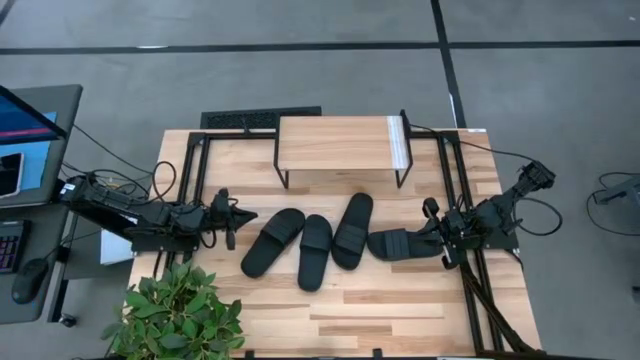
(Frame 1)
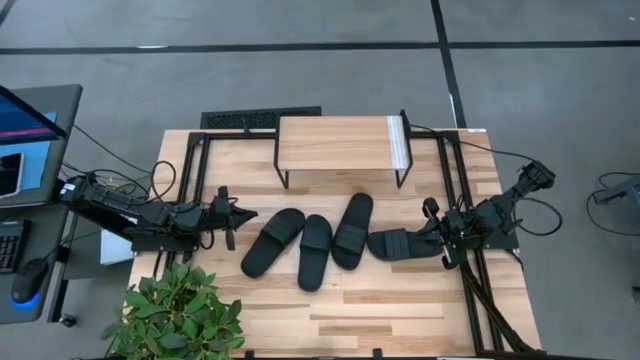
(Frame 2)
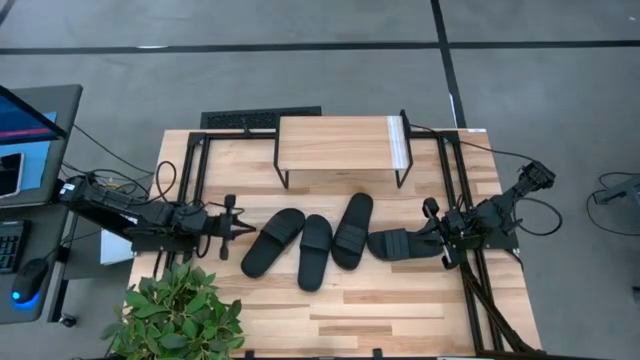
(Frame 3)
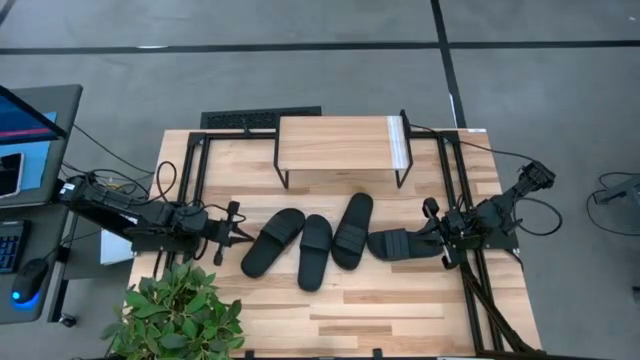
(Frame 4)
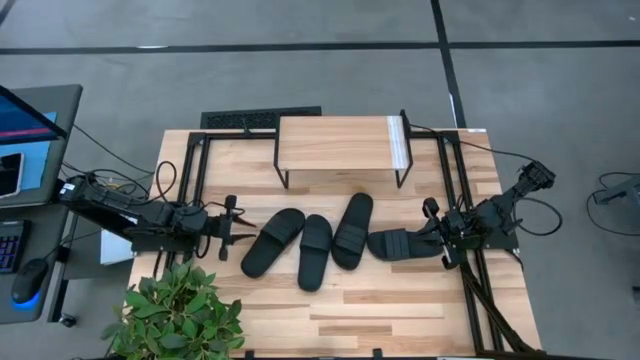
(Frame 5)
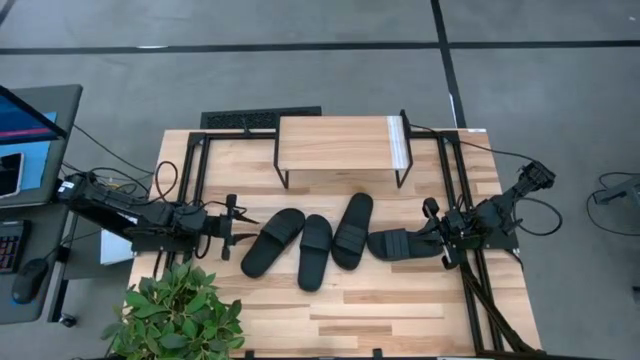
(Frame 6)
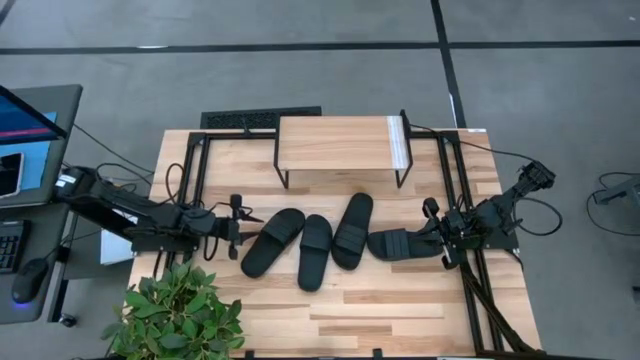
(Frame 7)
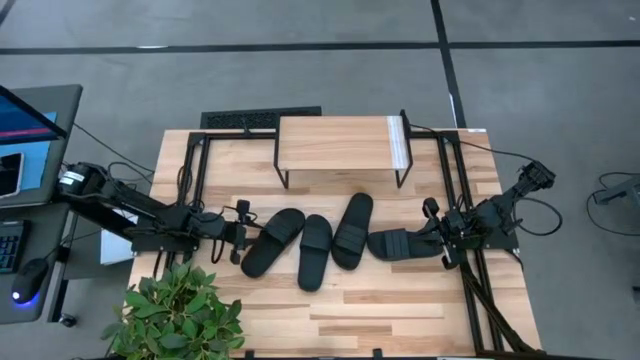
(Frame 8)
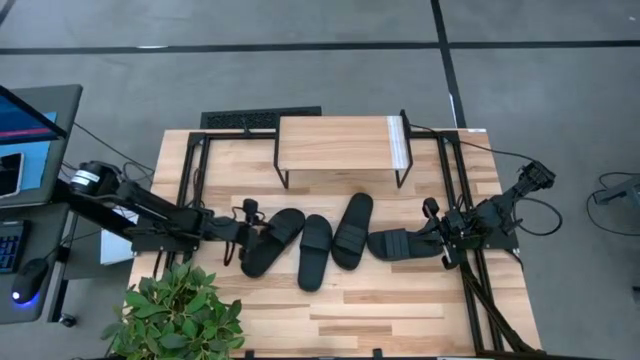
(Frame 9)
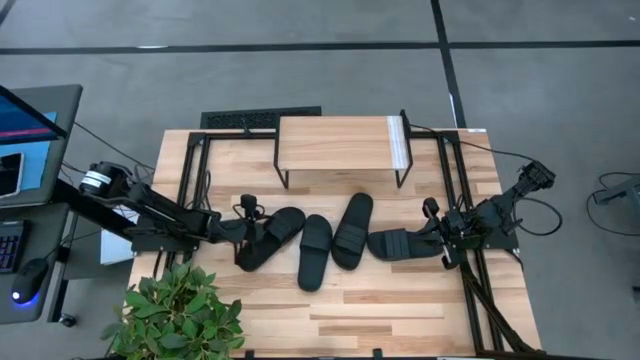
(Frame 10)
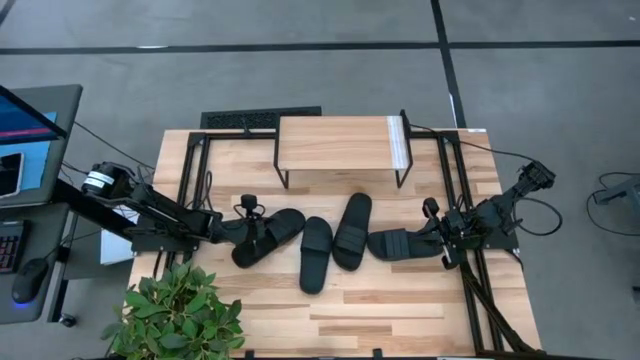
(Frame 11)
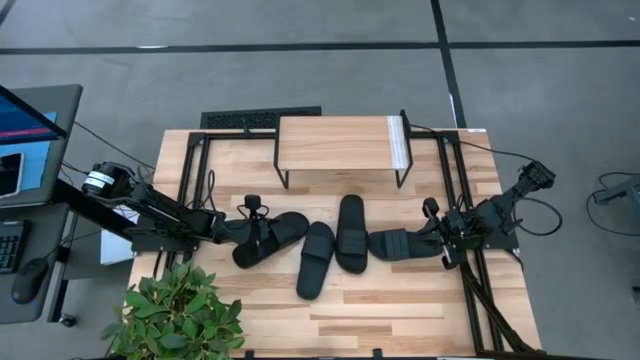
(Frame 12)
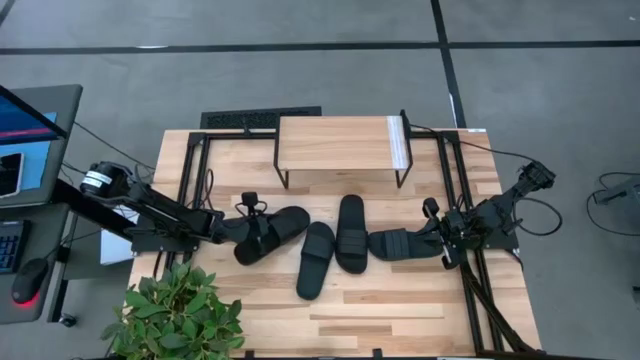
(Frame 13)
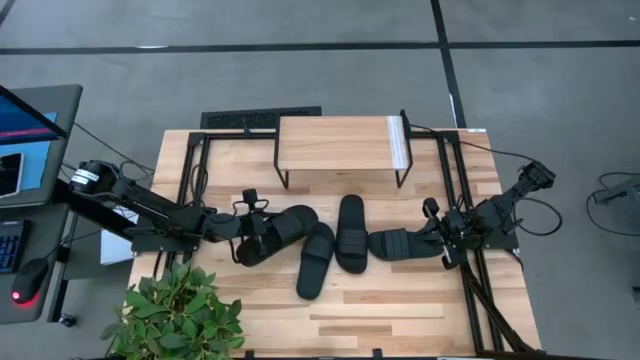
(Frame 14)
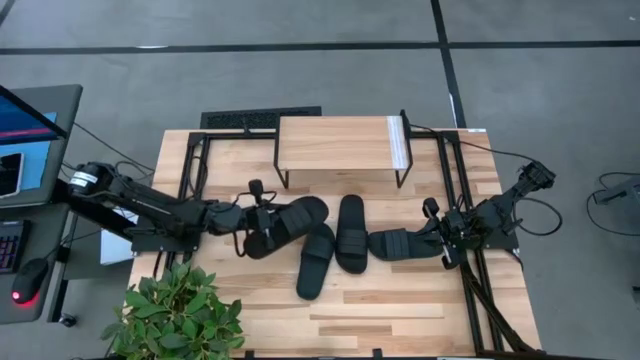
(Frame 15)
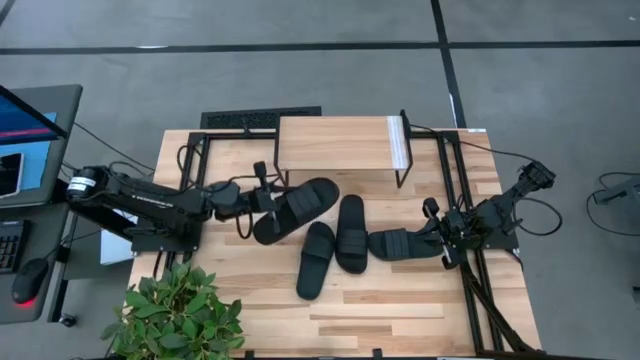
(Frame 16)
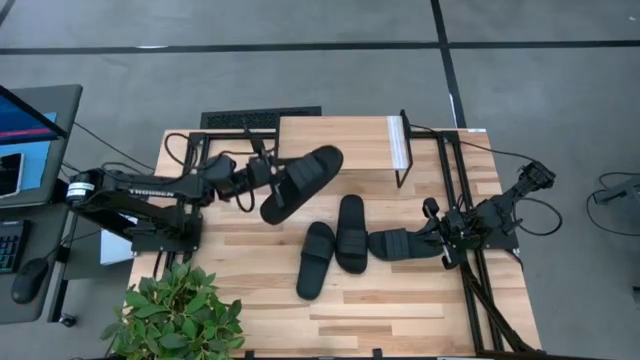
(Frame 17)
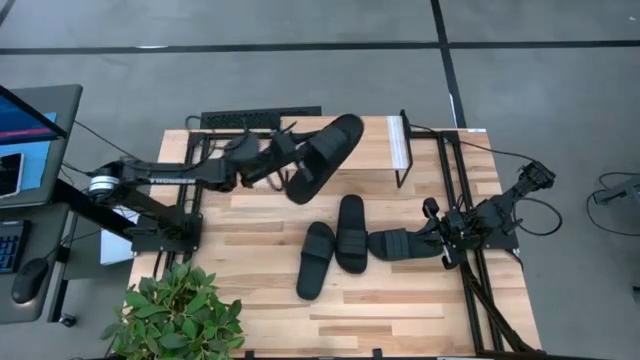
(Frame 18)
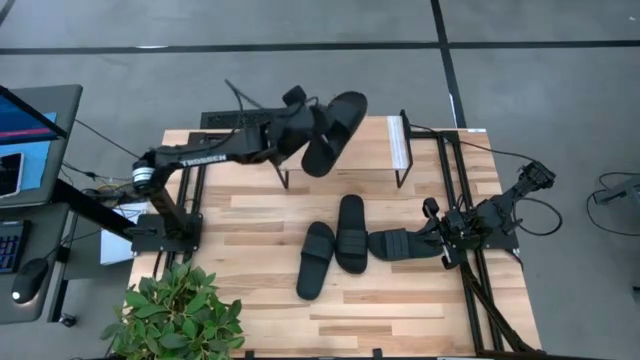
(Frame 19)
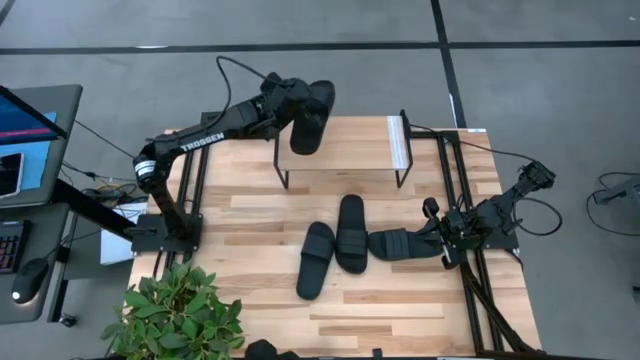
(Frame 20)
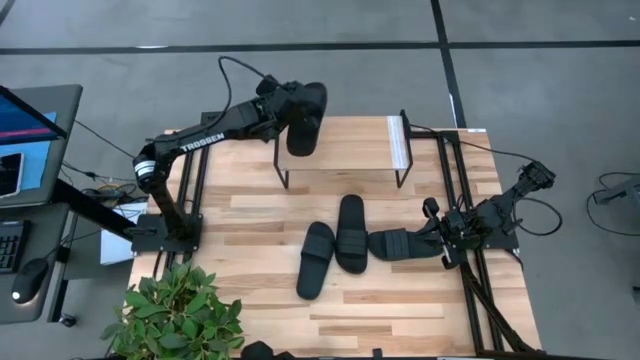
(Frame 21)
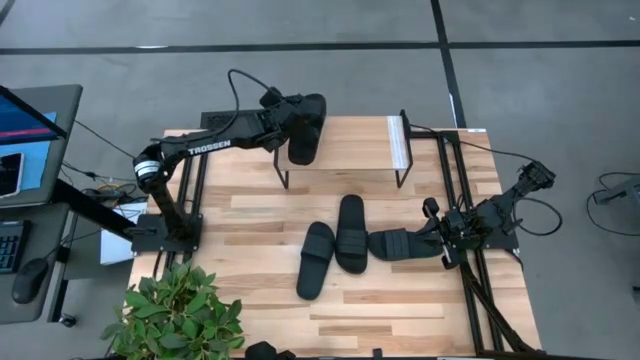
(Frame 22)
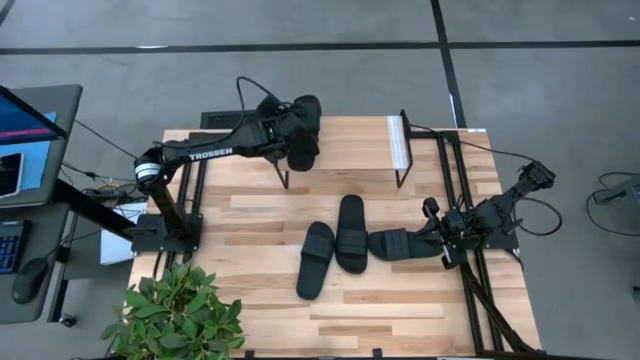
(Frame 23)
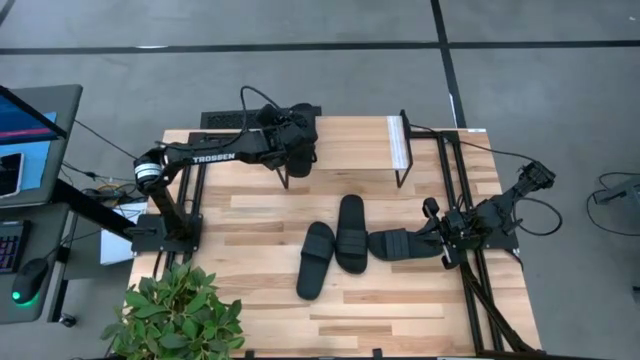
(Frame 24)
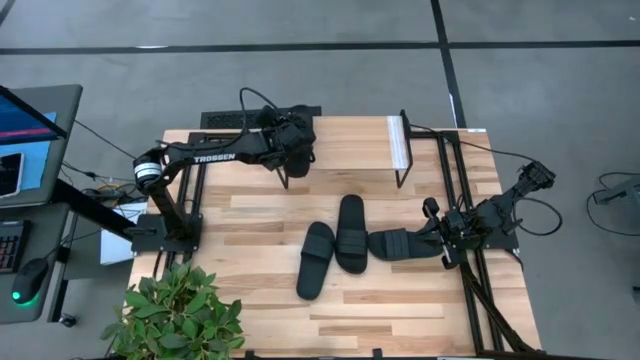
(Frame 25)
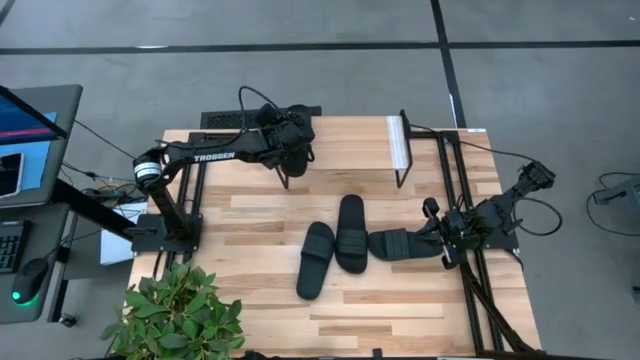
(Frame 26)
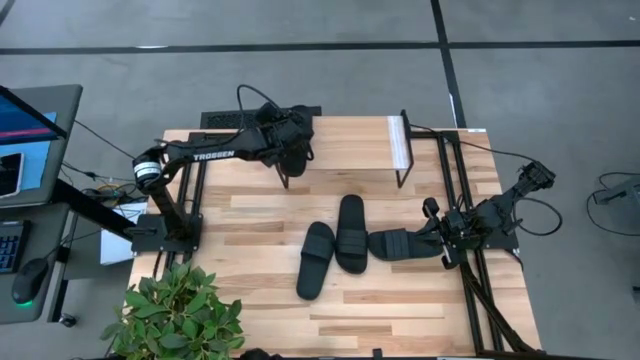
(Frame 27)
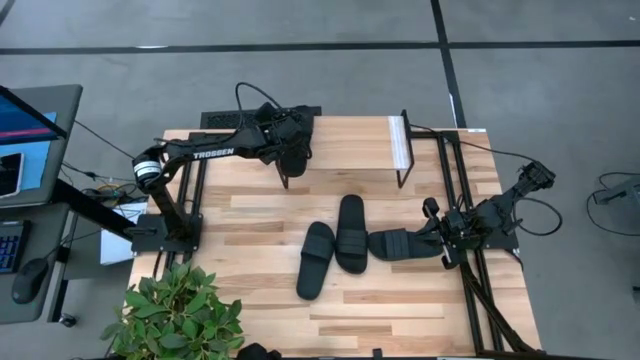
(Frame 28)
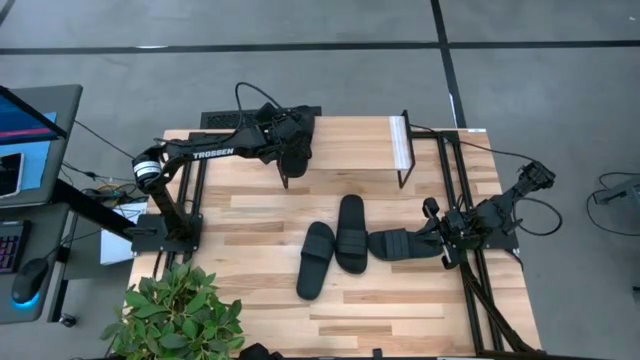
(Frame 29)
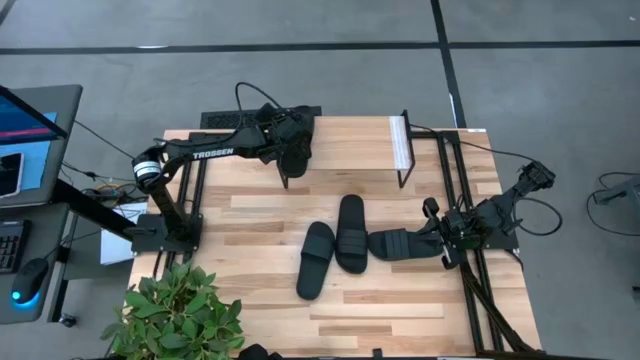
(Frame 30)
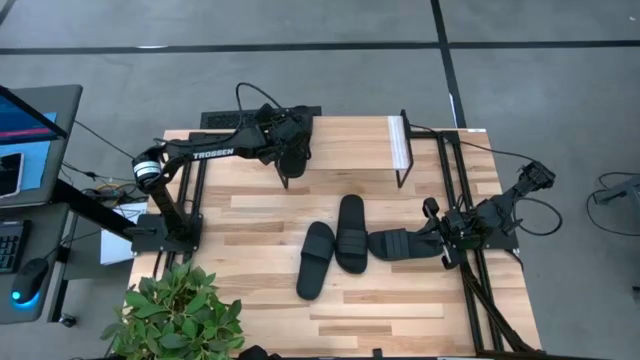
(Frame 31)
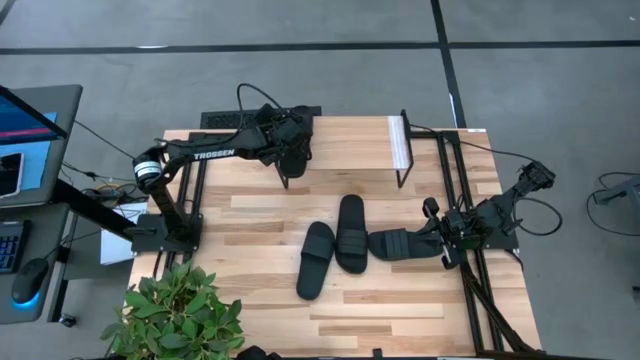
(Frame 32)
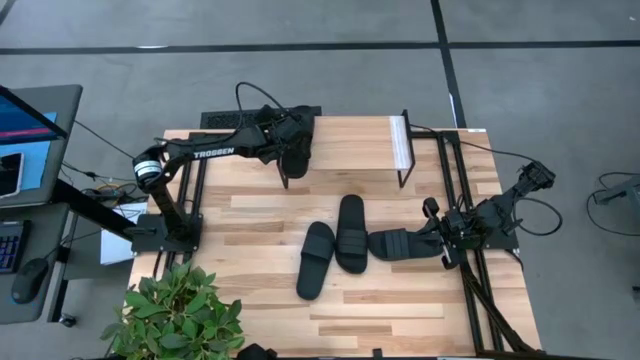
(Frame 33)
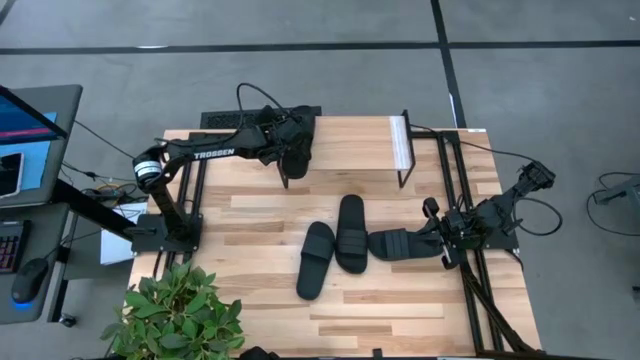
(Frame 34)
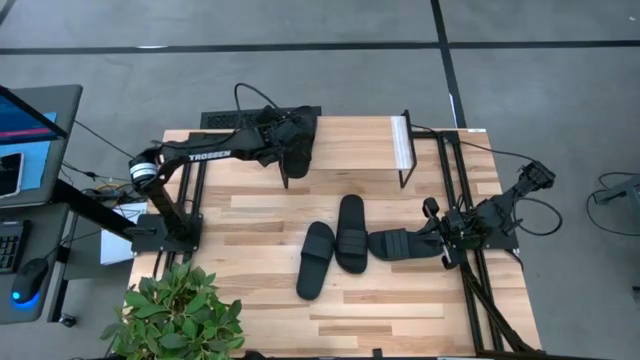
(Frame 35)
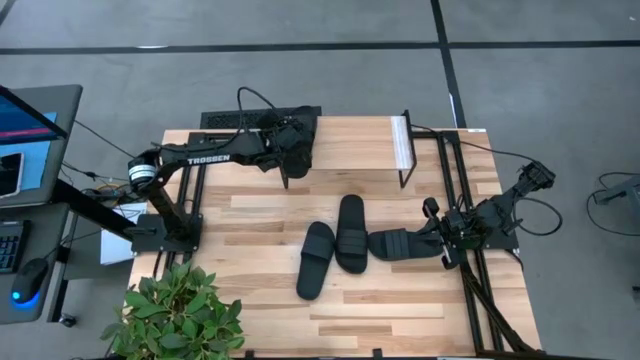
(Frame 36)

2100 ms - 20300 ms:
Task: Pick and place slides into the shelf
Put the black slide on the shelf

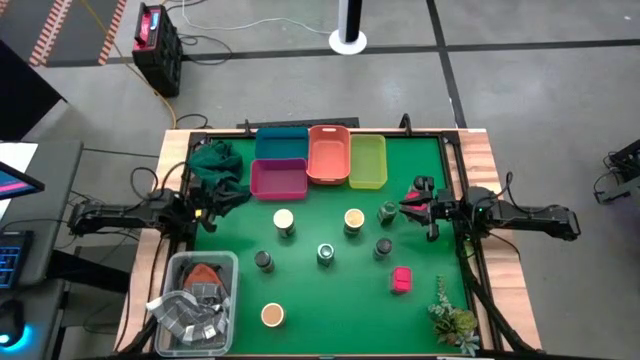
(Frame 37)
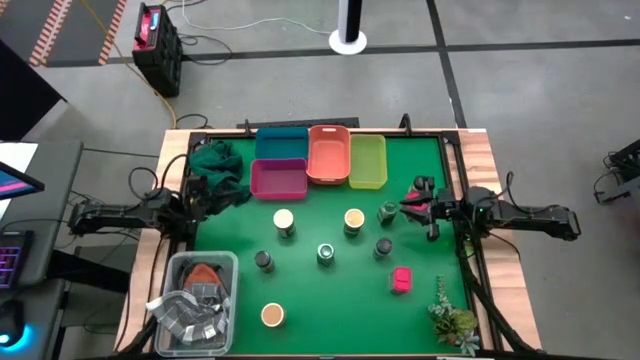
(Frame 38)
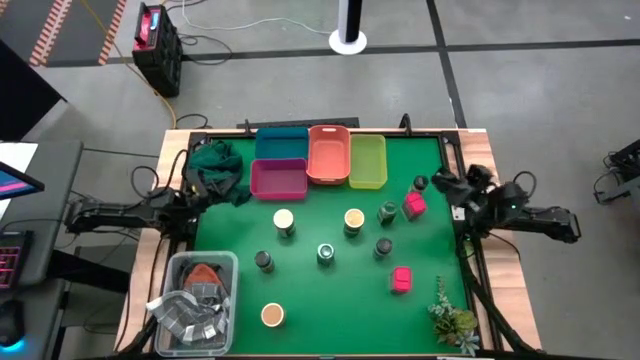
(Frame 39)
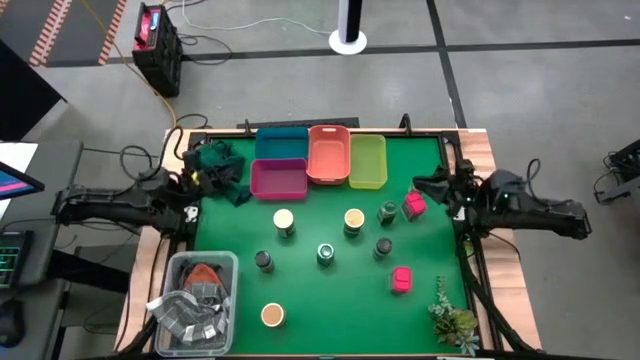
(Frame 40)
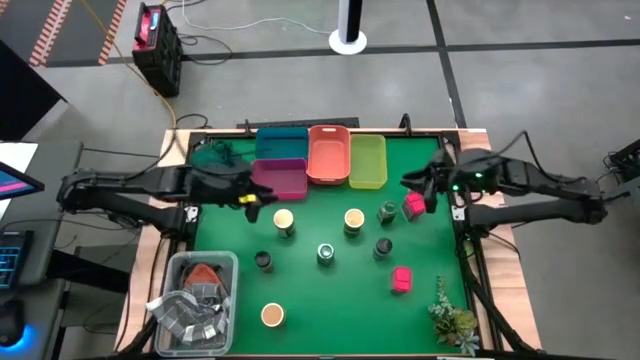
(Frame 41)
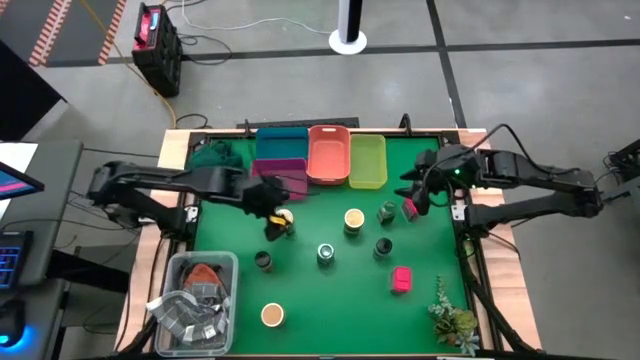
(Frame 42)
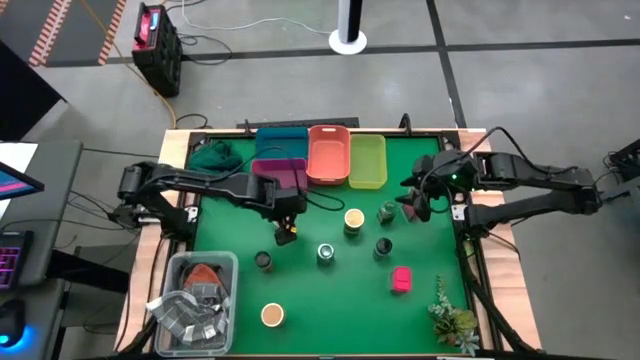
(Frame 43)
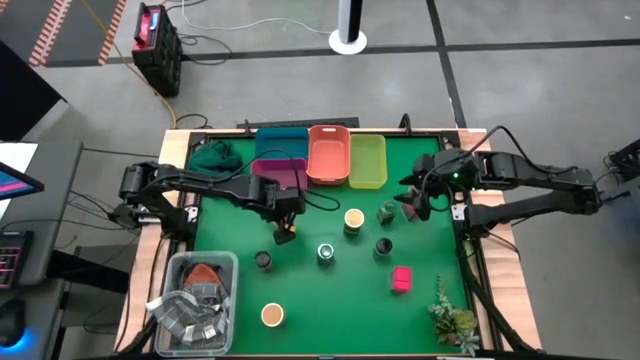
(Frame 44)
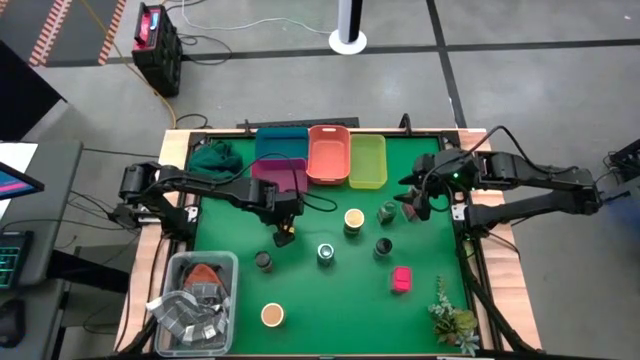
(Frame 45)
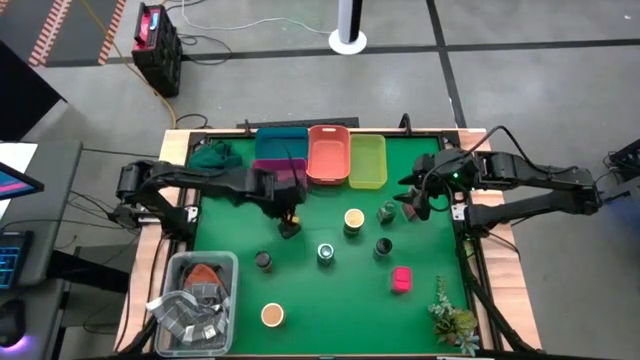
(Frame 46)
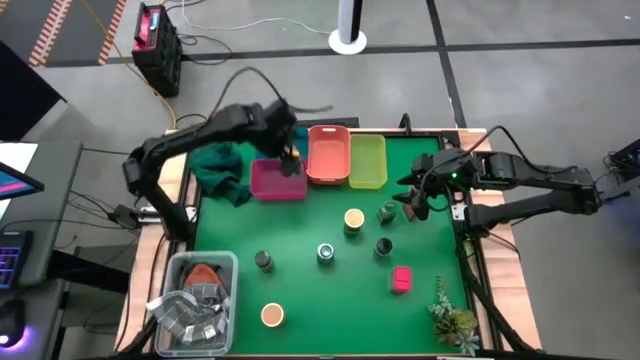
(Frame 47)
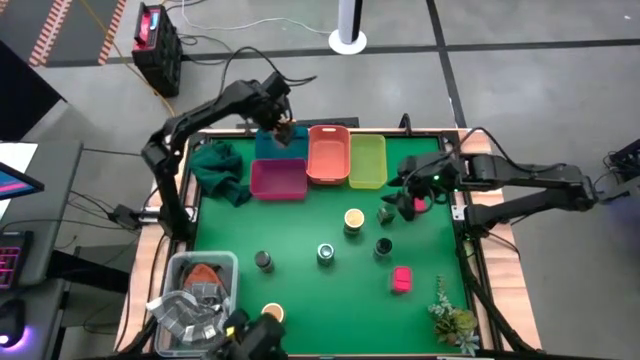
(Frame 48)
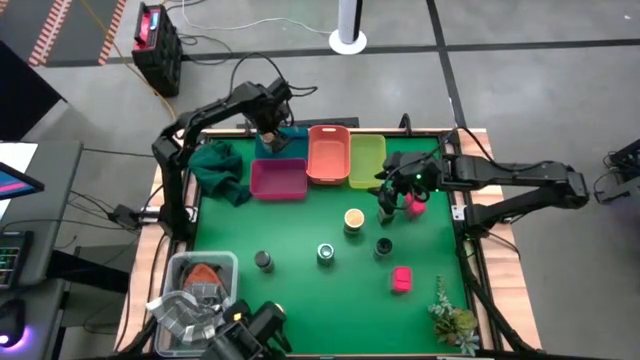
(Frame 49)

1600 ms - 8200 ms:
Task: Sort spices by type
Put the top left gold seasoning bottle into the blue bin
